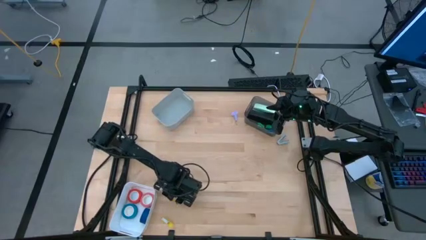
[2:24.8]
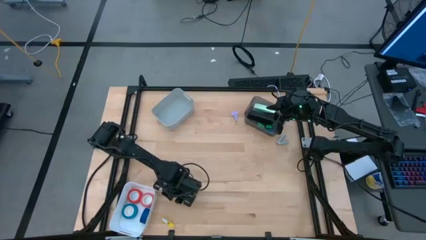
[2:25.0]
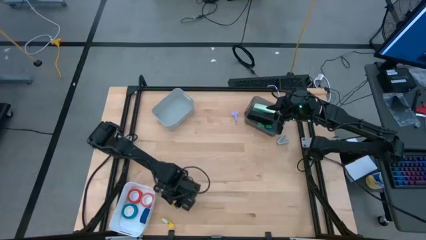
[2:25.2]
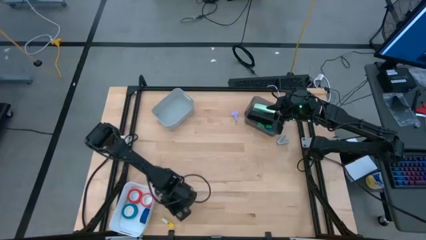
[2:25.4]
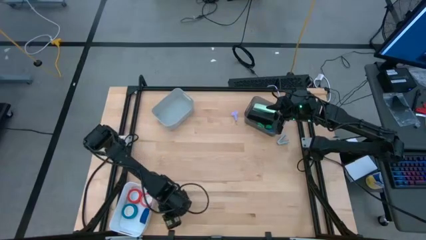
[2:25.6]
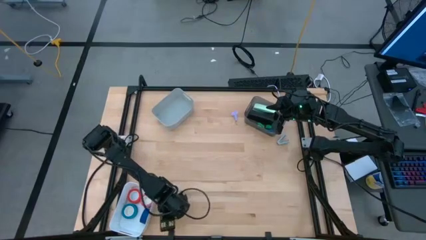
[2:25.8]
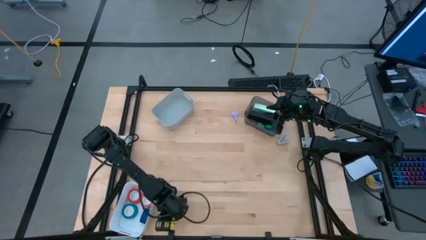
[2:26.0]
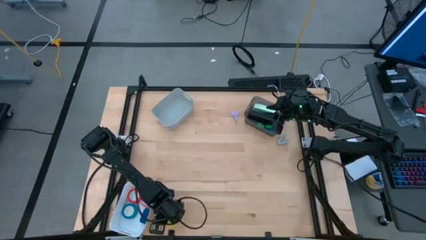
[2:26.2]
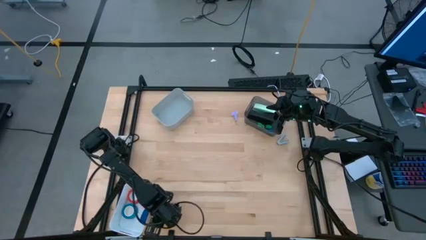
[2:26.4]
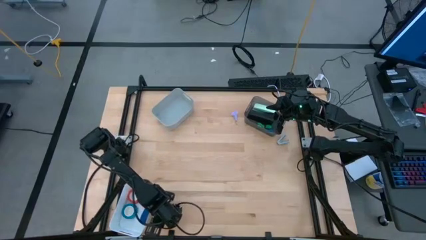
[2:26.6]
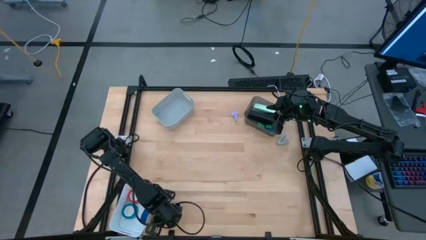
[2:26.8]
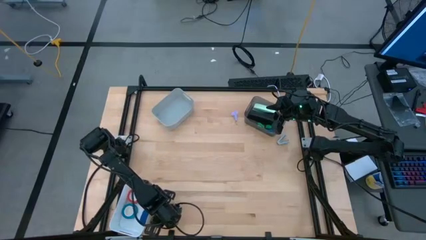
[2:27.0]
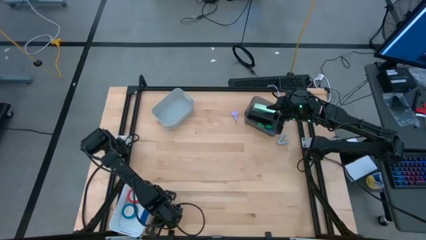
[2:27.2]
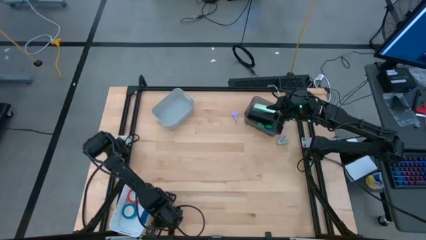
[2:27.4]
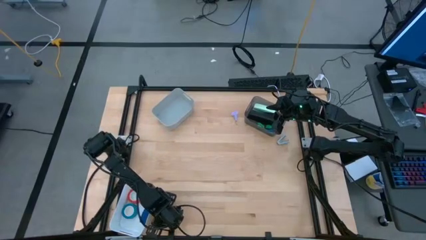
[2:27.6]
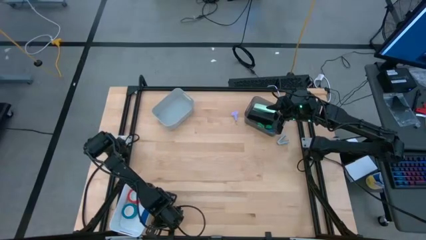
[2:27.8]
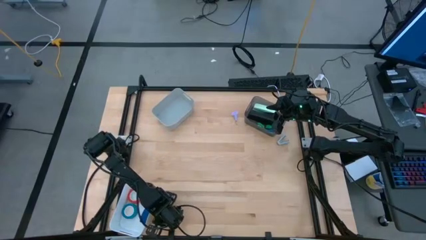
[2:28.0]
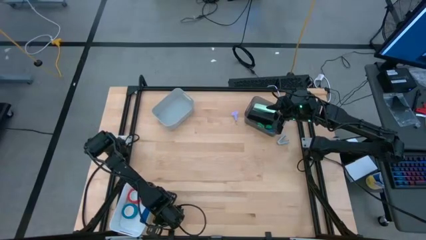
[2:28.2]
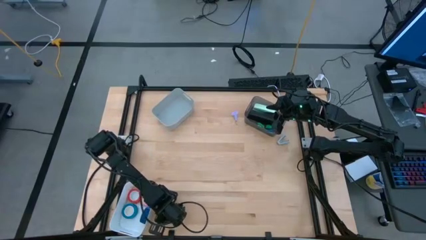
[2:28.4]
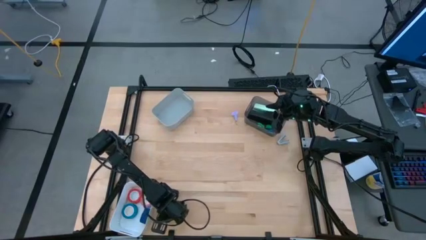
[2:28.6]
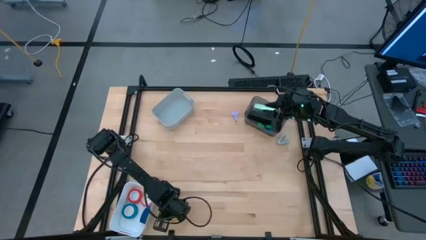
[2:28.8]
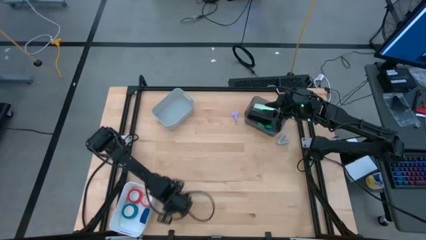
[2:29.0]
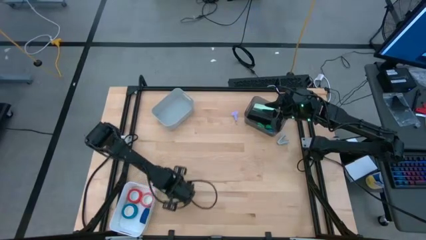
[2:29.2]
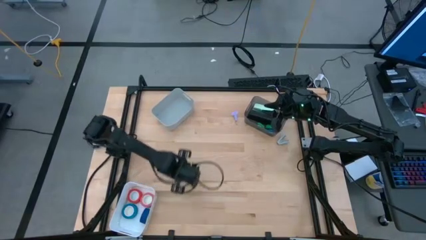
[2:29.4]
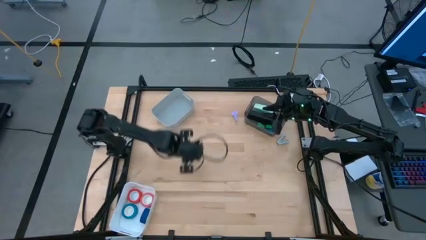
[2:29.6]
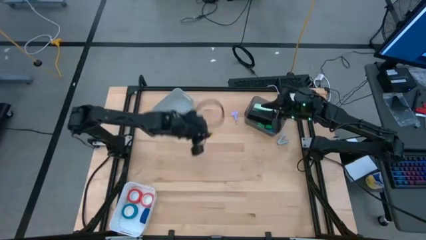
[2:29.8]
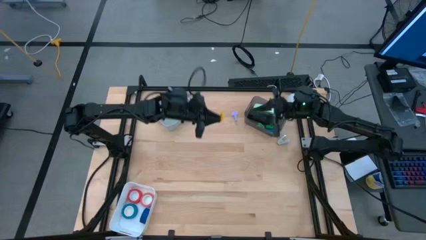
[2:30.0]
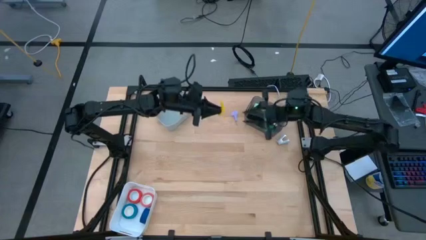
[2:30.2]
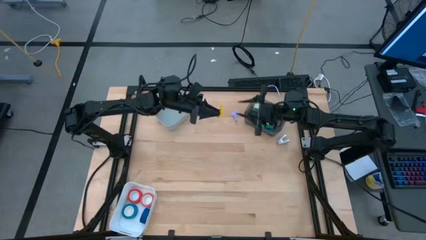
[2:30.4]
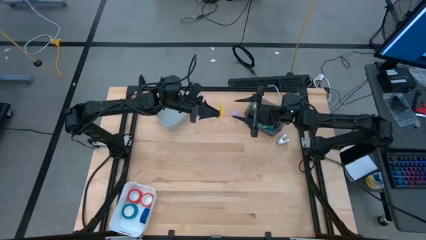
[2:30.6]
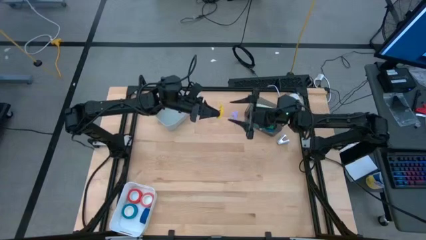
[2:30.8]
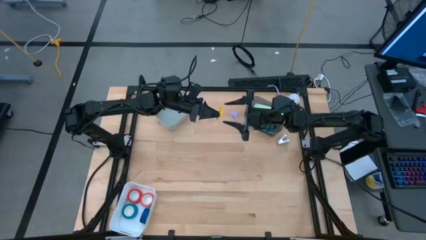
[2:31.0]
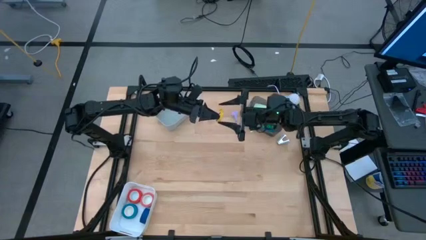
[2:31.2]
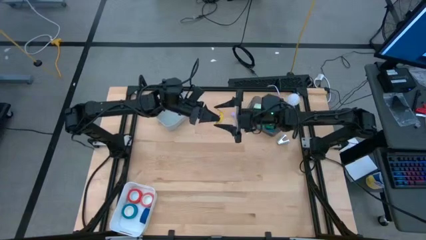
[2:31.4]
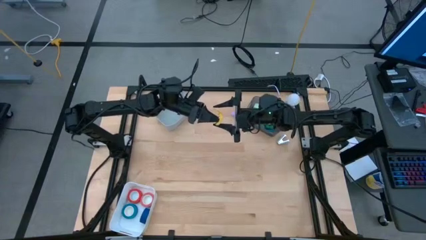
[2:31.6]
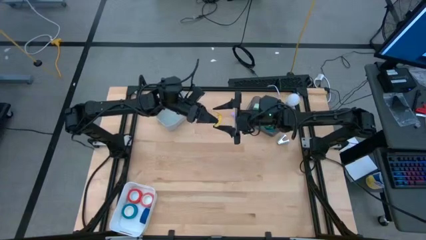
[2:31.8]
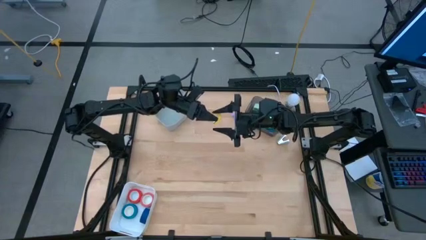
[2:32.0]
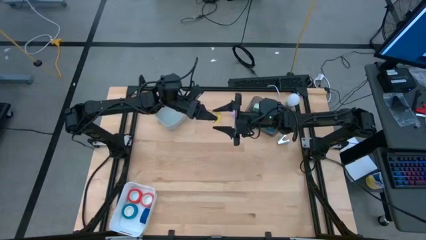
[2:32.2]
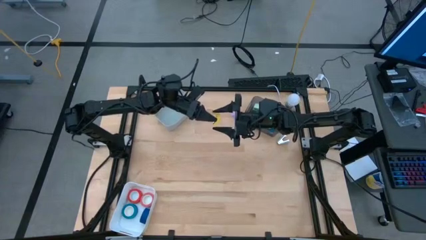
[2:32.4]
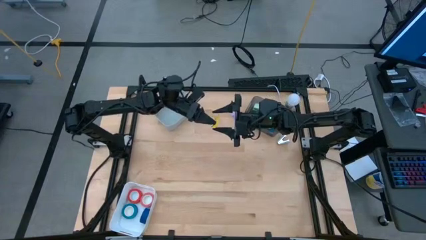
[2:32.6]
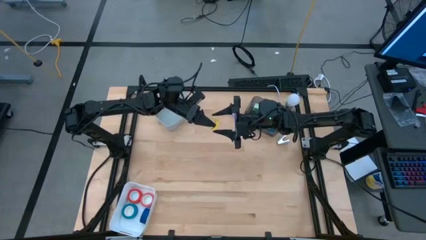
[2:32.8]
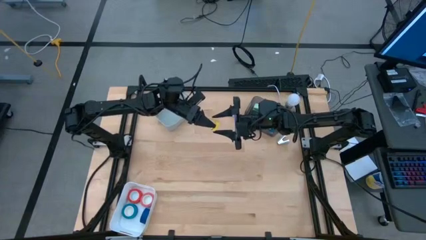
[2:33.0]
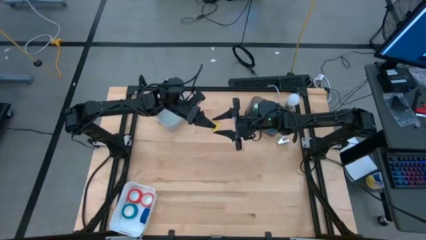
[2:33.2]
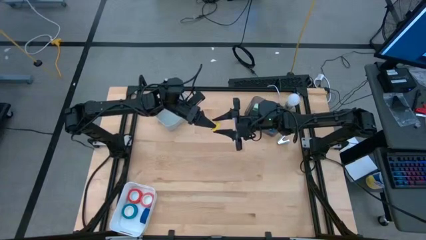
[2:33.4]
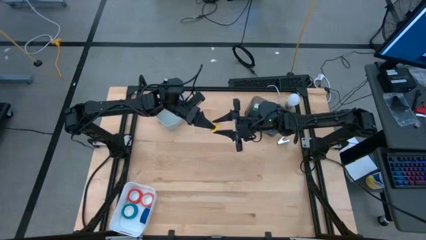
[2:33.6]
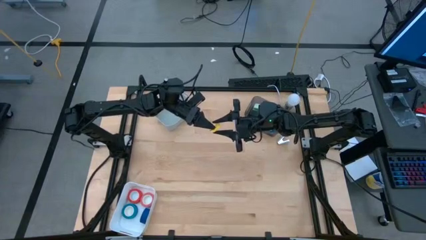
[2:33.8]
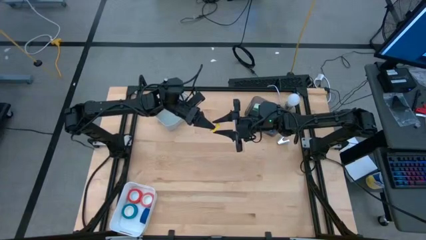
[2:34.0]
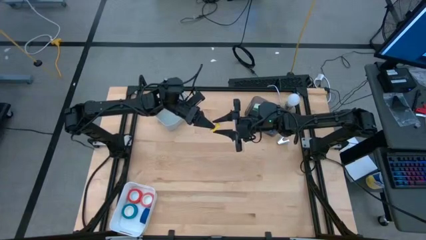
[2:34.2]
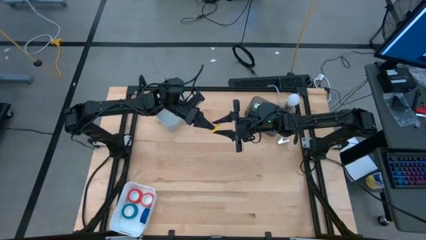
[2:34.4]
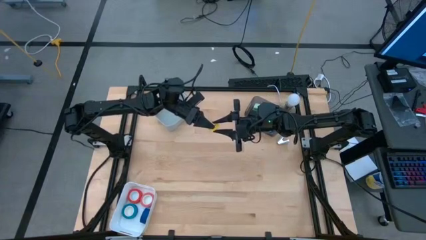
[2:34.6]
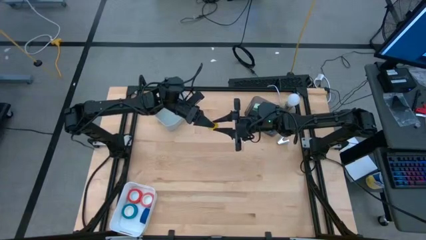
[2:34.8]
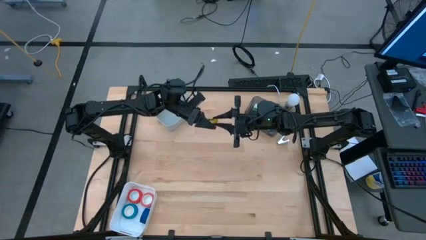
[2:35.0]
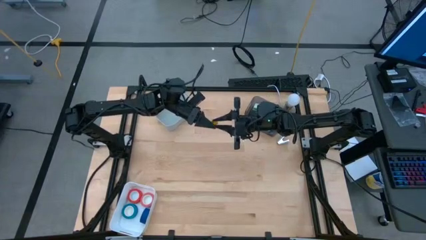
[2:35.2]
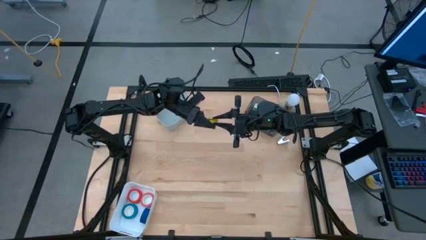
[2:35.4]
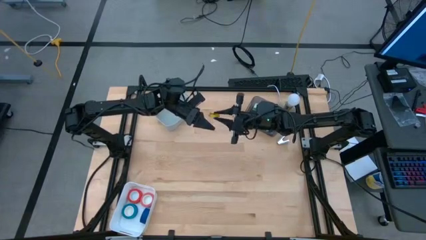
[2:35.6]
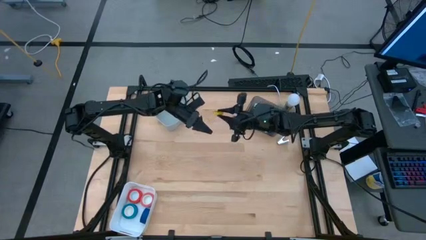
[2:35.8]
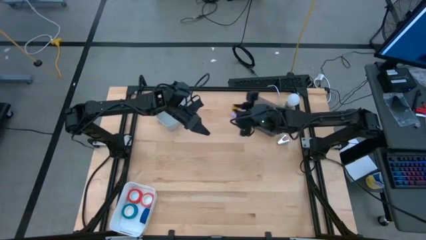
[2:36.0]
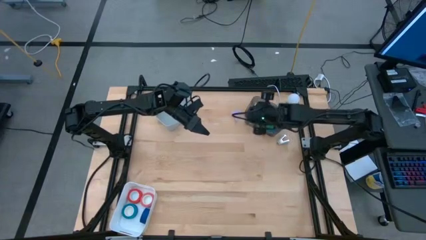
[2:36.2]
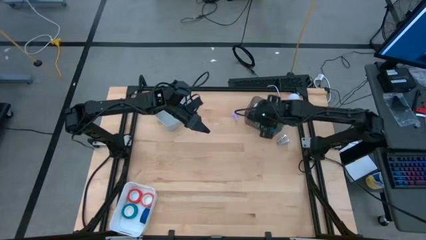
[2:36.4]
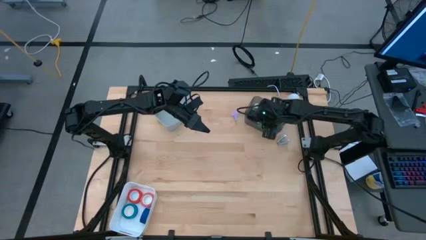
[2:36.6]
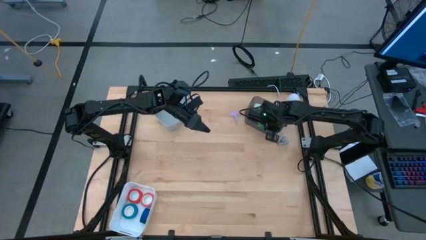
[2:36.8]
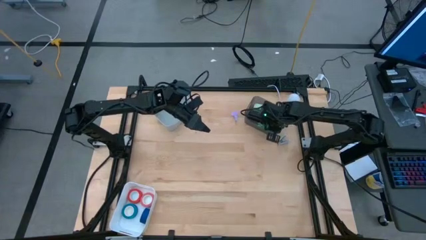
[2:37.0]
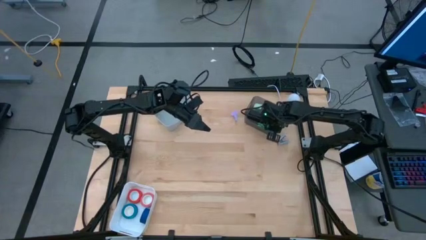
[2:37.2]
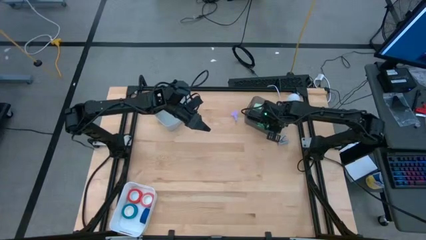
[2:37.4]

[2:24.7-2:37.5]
Task: Pick and place Stapler, Stapler remover, tape
Put the small yellow stapler into the black bin

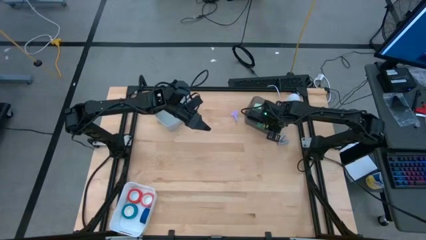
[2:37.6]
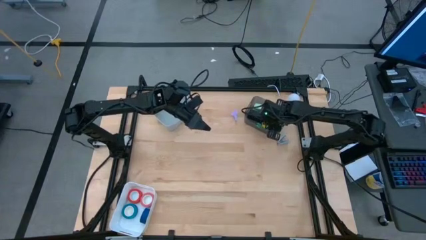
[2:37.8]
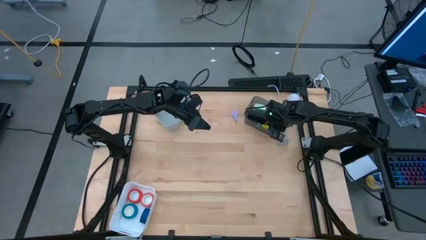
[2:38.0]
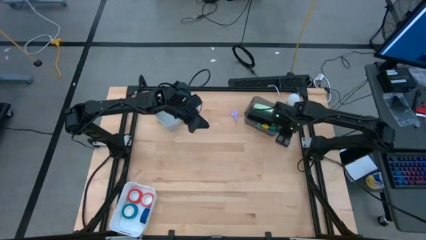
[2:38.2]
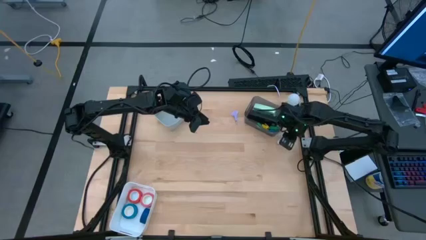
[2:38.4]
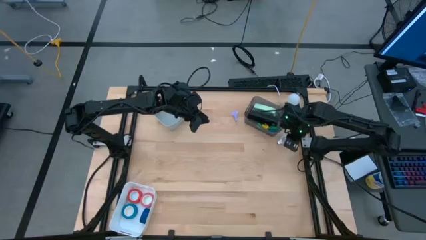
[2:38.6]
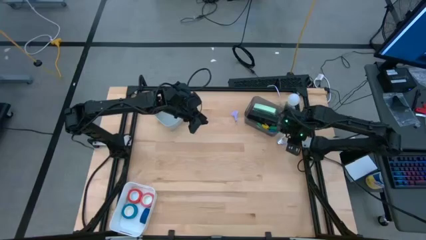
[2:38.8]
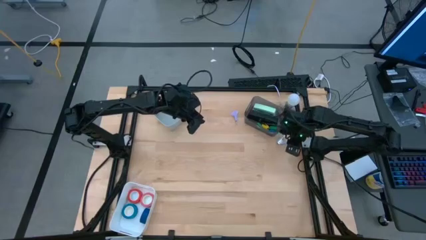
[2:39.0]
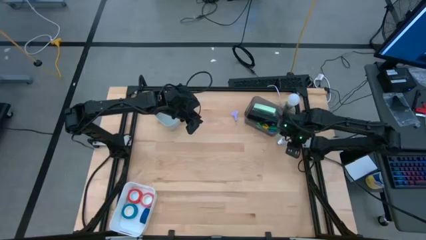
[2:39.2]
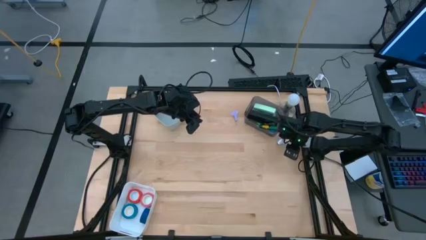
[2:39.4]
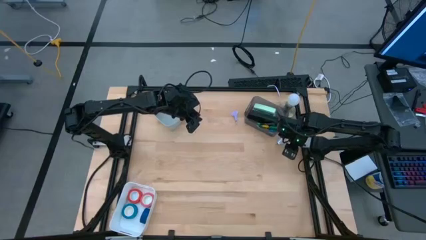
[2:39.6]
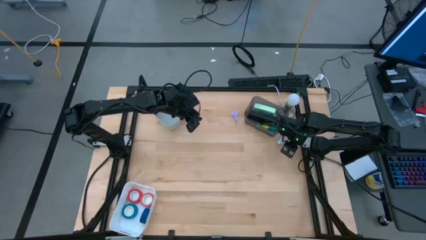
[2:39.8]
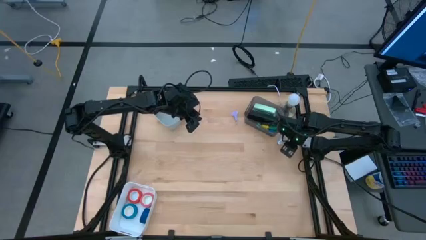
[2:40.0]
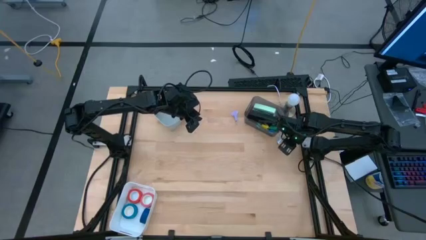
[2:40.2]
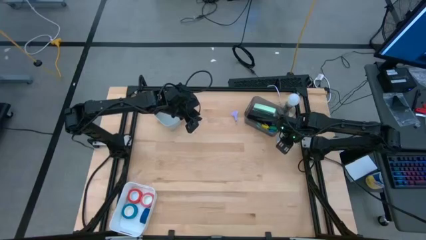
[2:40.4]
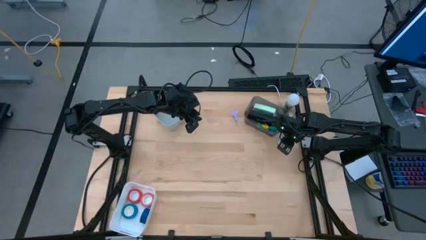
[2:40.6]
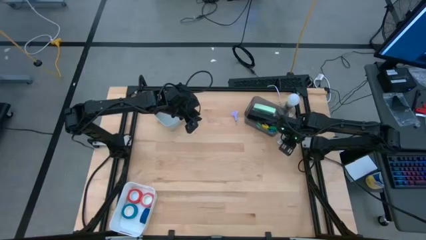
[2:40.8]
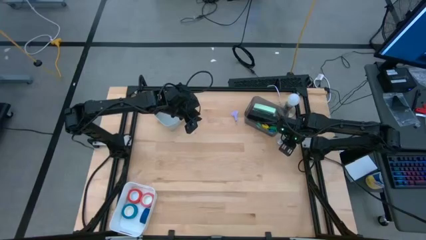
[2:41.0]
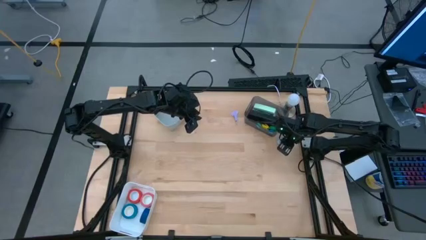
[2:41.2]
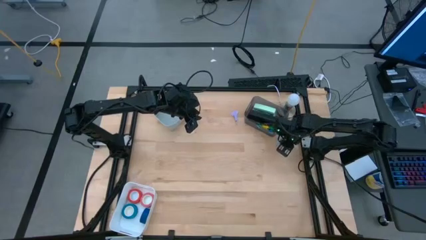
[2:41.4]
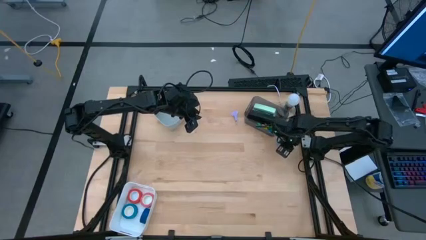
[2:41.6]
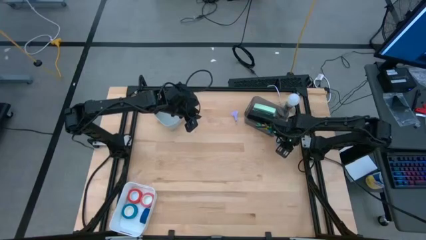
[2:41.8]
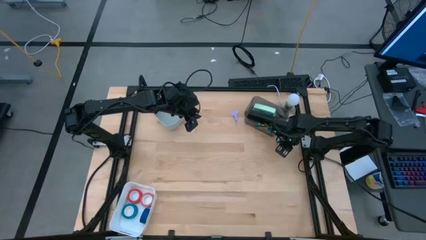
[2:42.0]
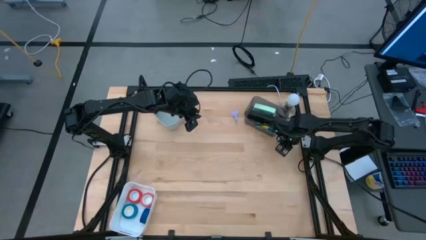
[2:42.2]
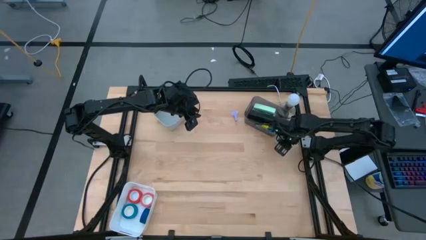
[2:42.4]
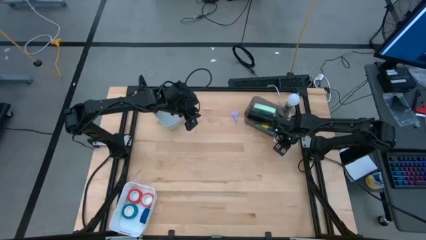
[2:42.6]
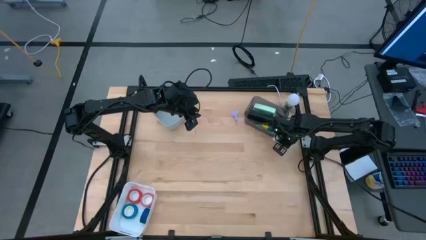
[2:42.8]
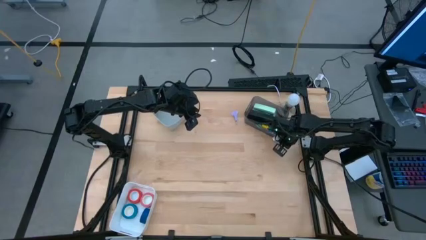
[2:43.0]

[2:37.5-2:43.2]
Put the light blue staple remover into the grey bin
